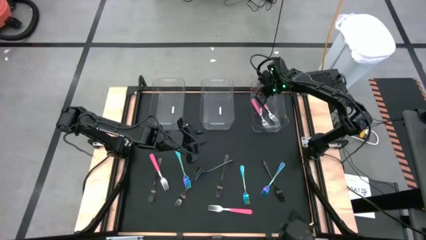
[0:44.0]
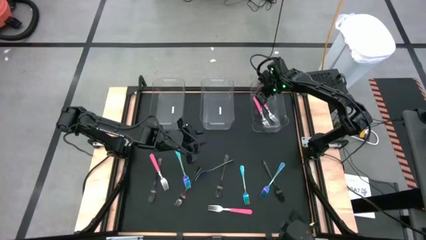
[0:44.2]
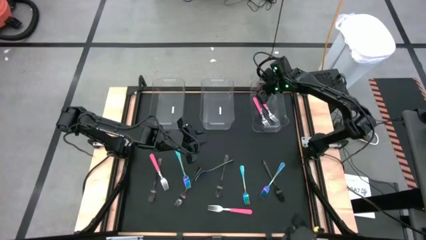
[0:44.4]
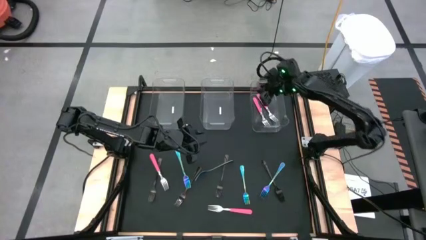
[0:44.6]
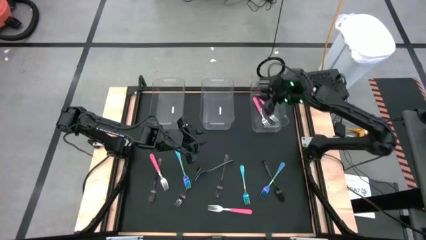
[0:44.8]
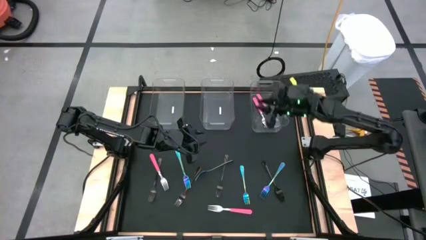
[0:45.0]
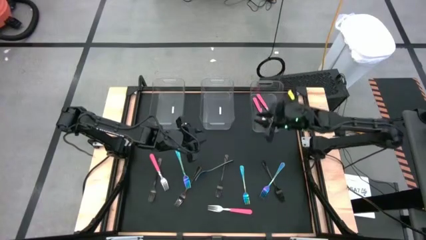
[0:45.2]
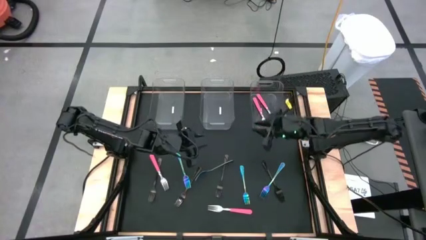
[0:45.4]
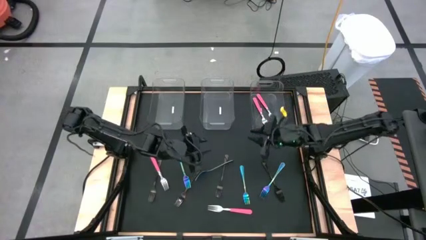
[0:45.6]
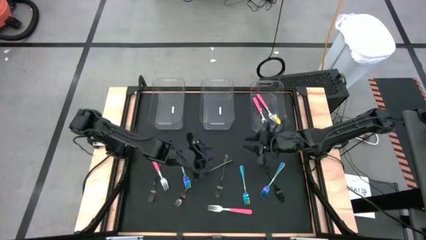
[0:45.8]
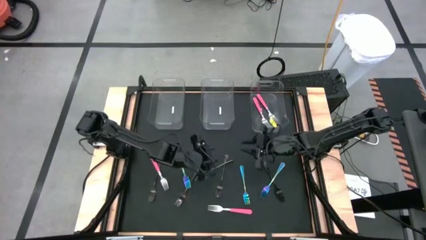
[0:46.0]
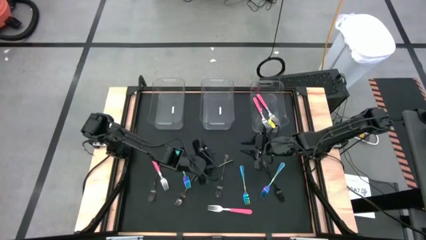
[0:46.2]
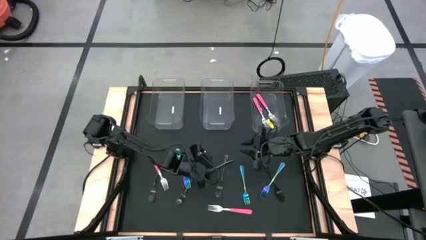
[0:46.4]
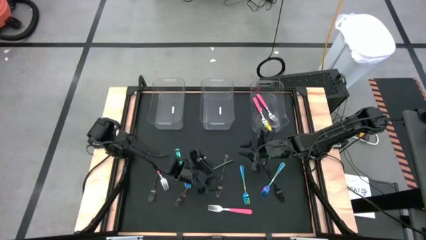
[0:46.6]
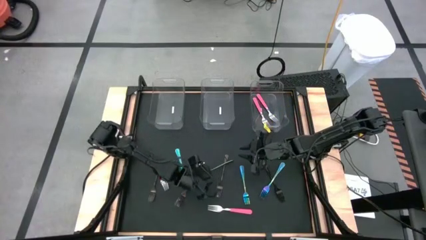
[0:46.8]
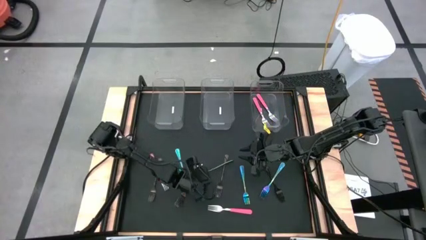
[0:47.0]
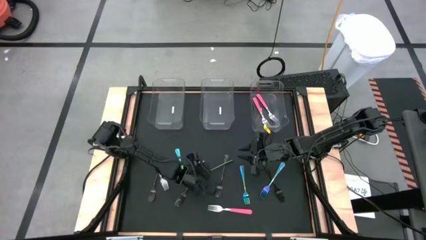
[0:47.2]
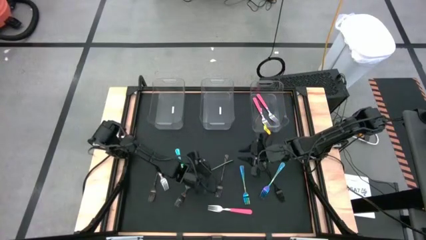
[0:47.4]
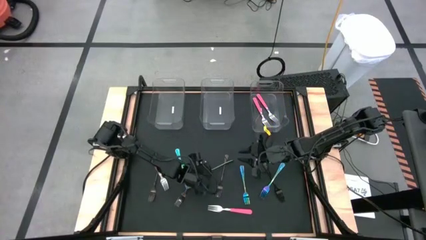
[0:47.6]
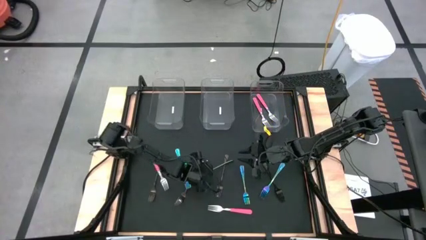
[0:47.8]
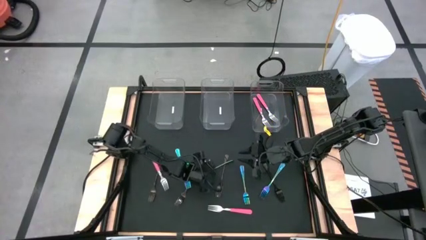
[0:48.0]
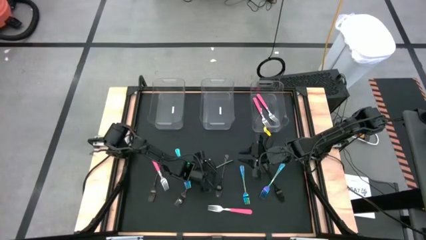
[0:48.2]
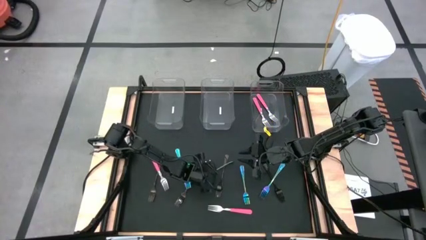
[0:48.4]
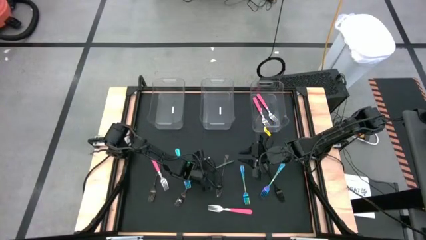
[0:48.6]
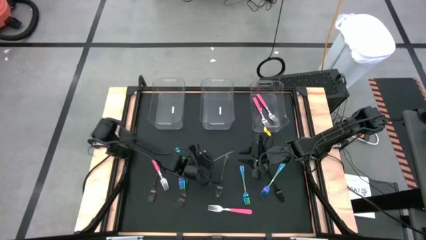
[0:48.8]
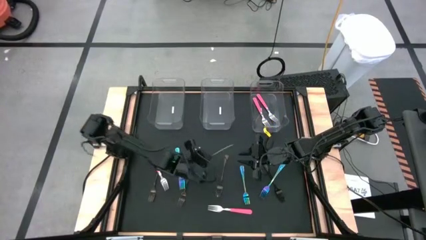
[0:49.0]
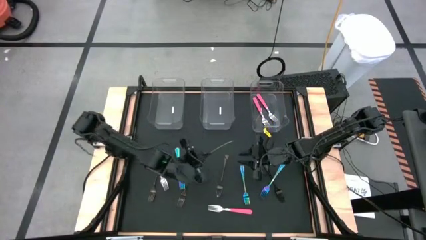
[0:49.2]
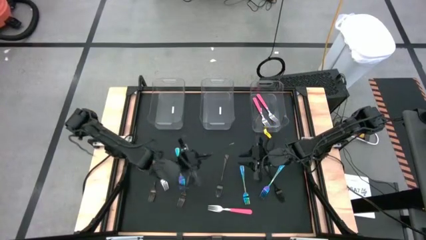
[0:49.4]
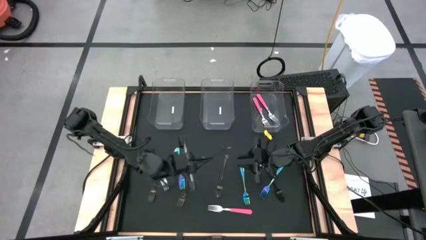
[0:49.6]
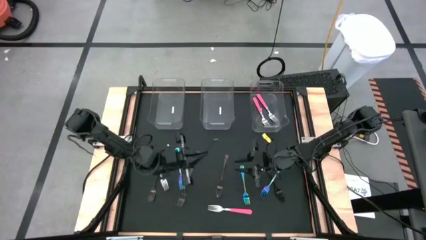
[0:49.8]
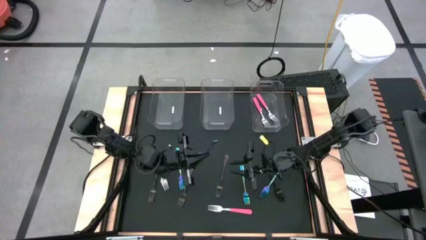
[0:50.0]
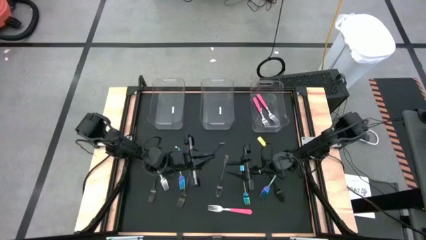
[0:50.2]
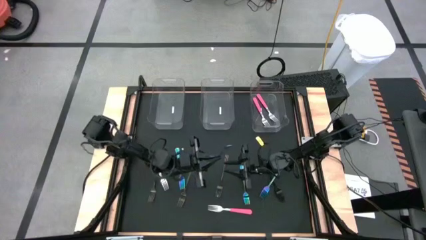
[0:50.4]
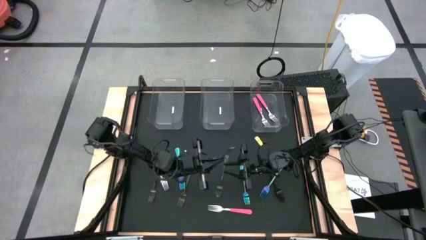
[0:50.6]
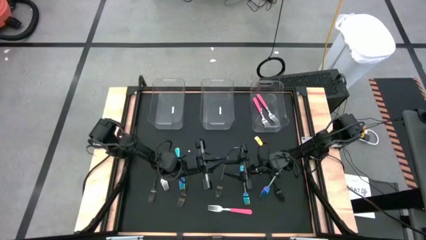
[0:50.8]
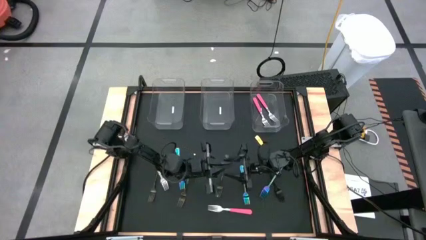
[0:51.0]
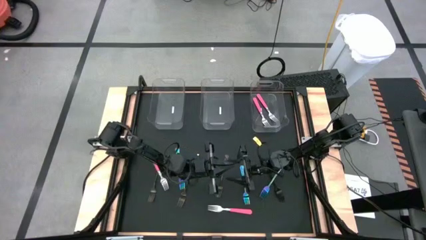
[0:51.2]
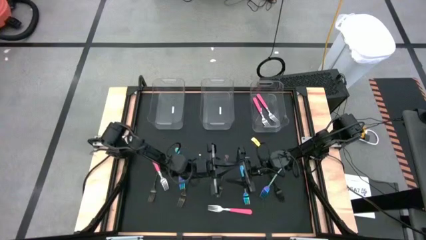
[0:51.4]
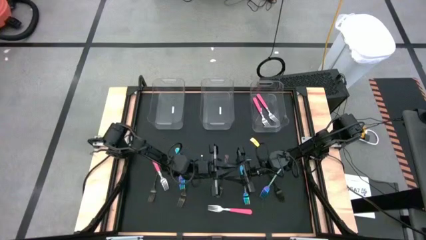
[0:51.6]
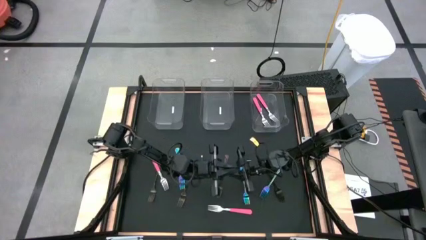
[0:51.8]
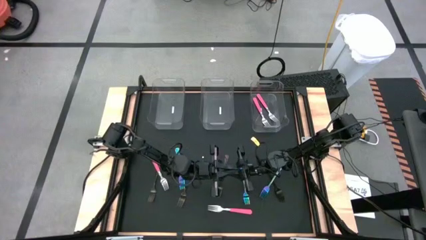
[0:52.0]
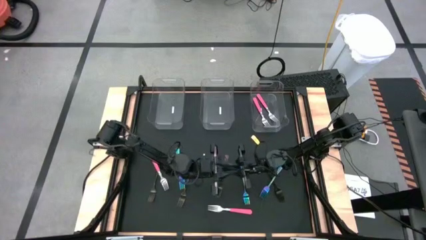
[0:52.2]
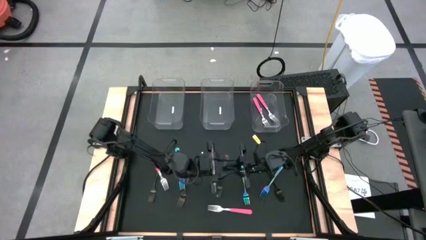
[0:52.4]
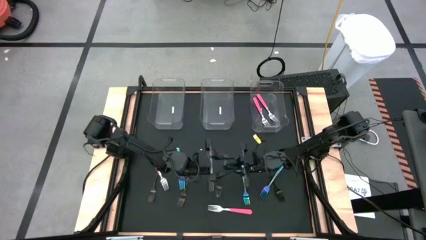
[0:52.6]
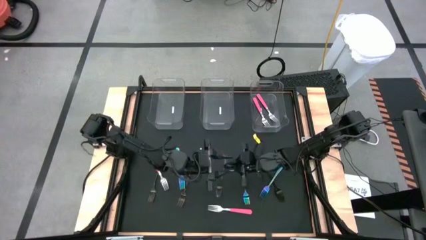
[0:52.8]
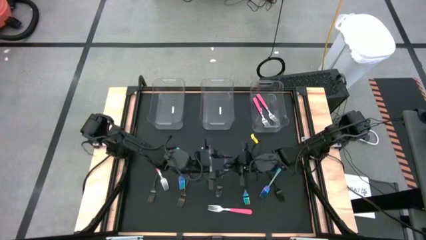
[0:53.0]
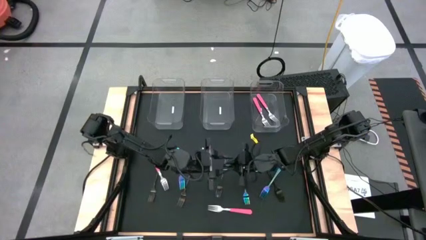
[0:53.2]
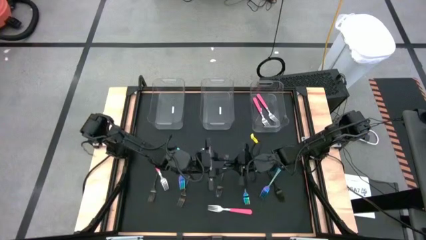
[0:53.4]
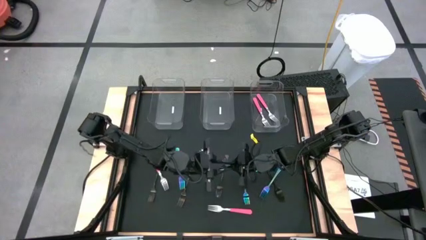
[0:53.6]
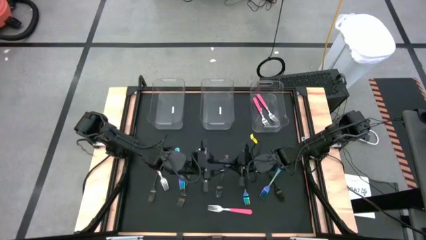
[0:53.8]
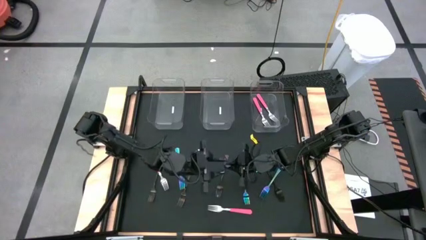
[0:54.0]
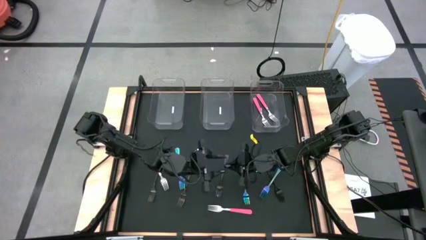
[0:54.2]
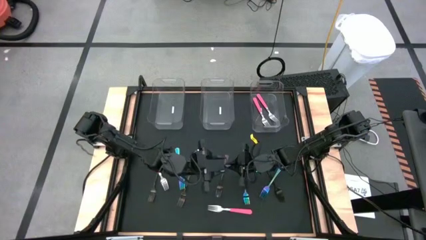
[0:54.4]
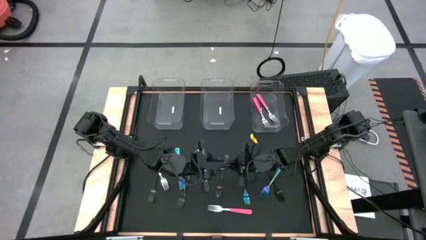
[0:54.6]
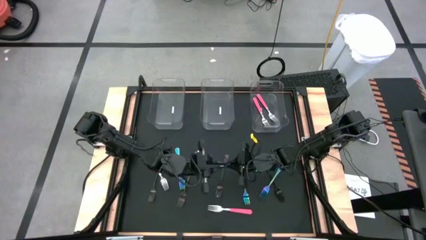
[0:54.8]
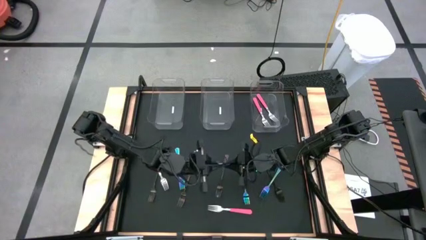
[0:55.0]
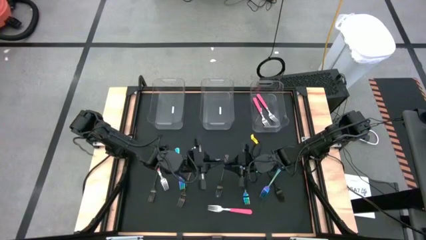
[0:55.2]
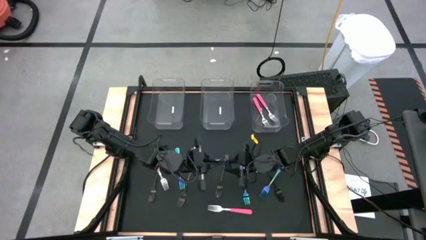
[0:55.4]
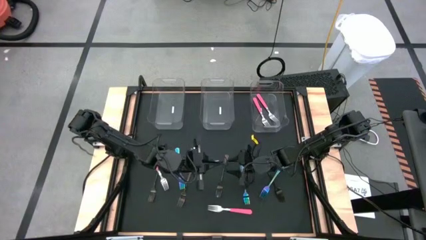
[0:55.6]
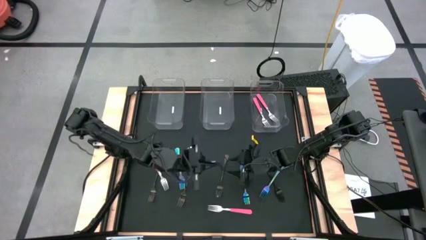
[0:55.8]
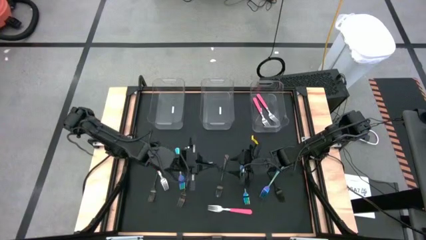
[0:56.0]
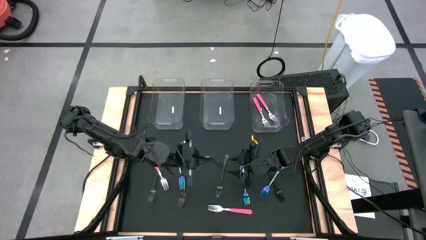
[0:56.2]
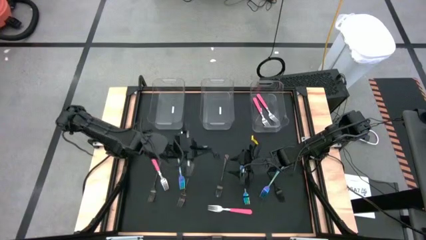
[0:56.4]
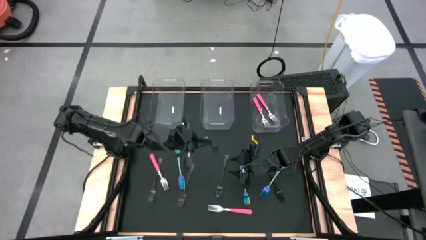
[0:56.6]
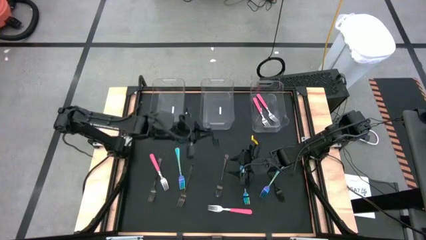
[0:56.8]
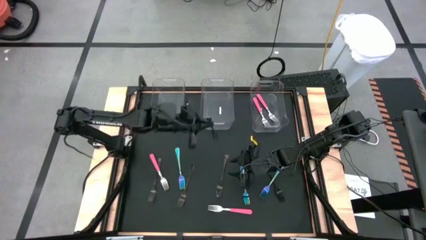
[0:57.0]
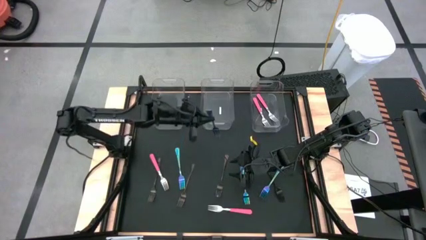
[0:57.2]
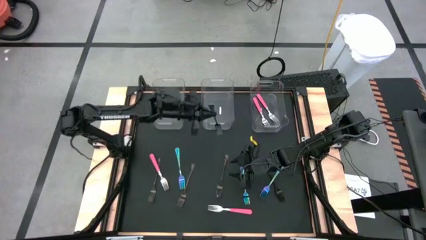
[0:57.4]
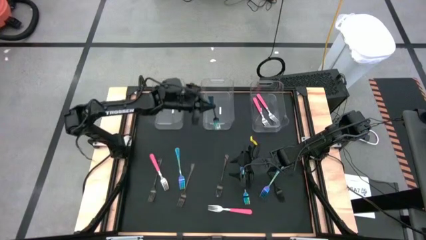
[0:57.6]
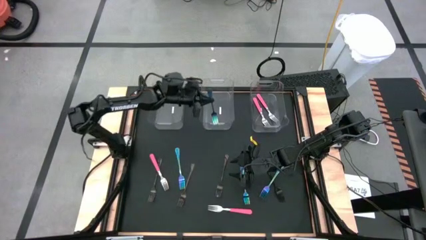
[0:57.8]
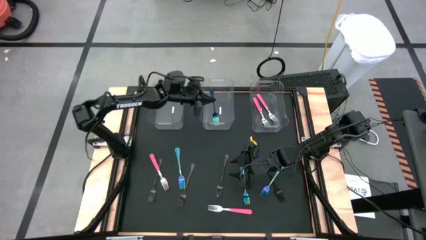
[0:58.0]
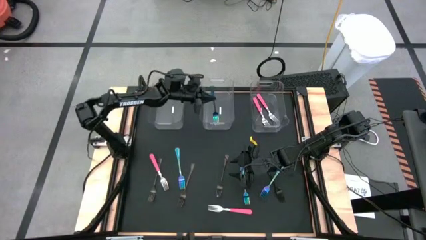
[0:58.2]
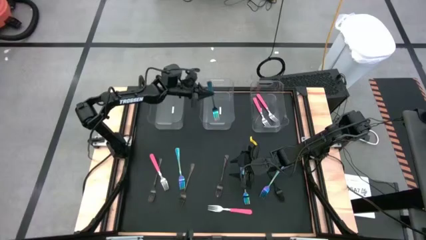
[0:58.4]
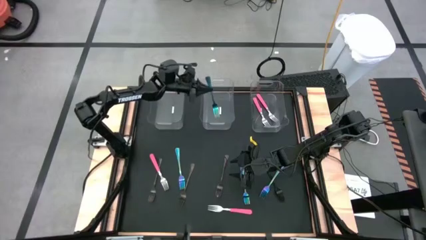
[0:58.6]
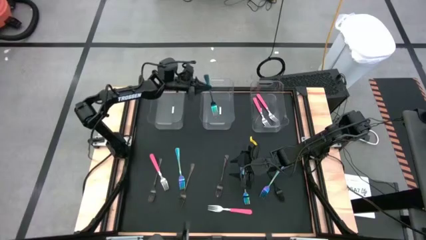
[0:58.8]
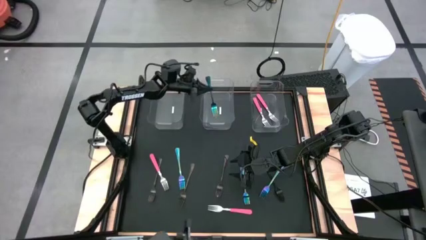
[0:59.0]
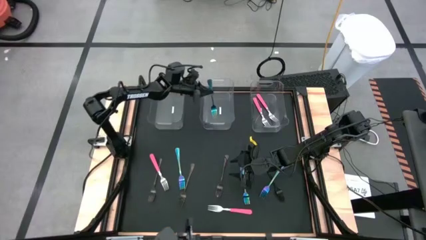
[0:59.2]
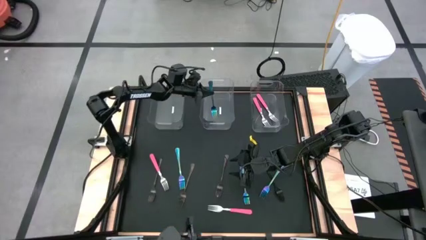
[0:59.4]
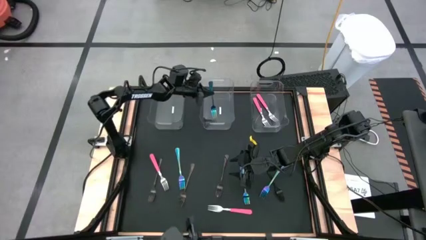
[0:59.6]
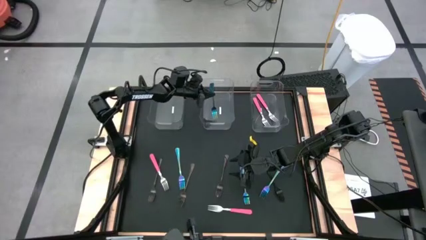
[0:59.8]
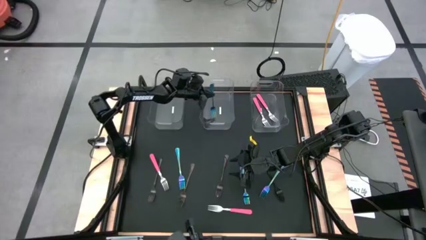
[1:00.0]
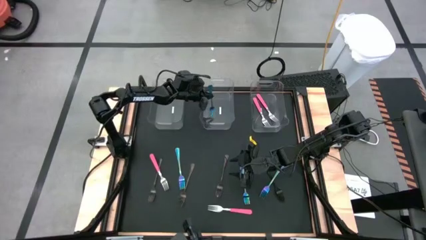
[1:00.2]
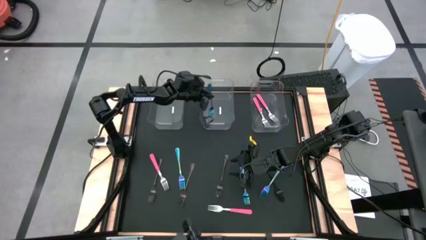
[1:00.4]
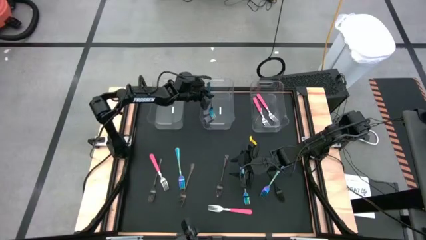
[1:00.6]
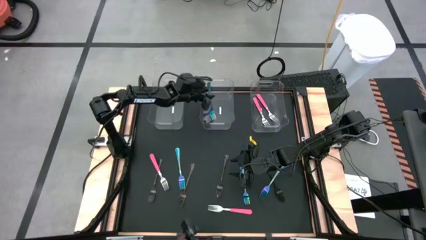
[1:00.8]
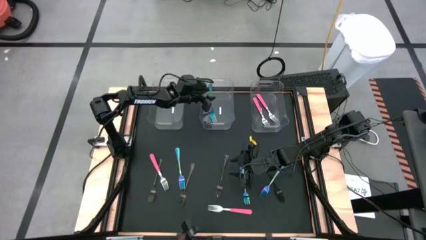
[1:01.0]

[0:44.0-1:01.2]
Task: Sort silverware by color (type)
Put the blue fork into the middle transparent bin
